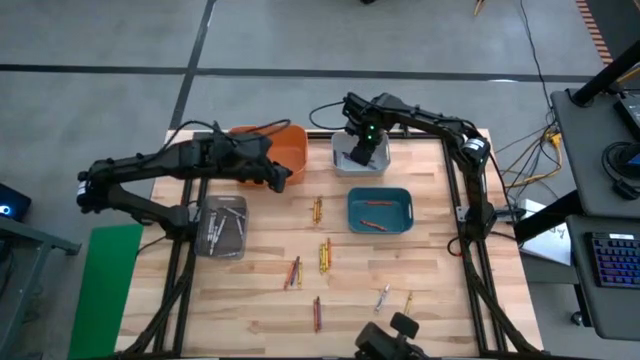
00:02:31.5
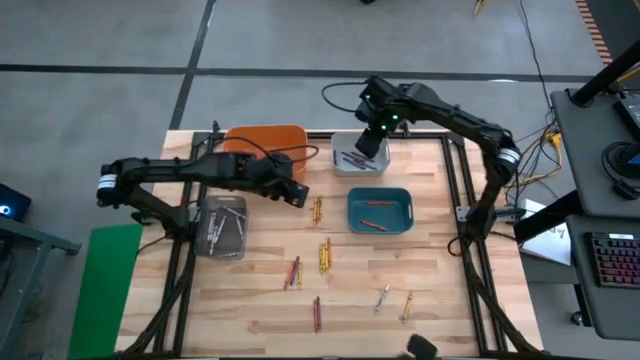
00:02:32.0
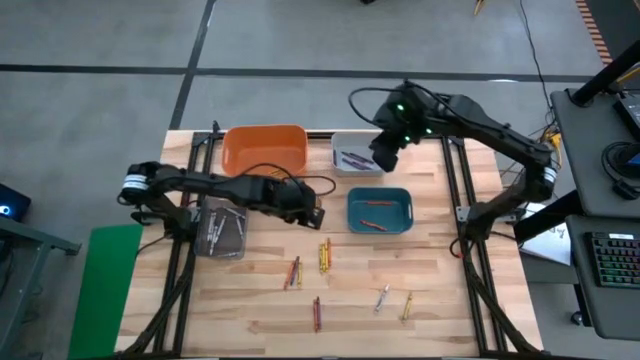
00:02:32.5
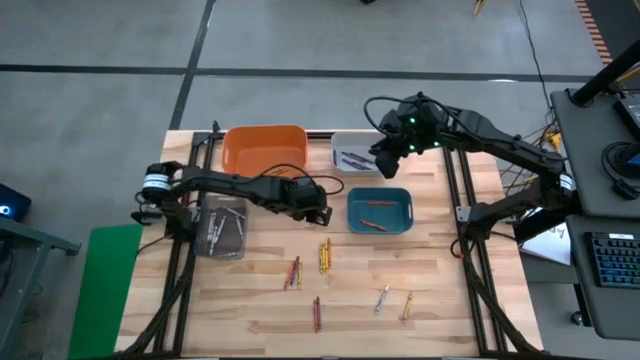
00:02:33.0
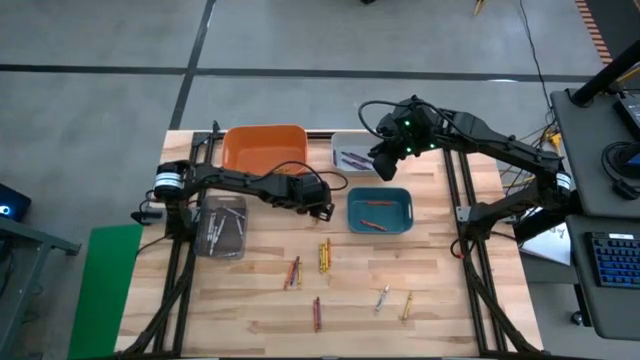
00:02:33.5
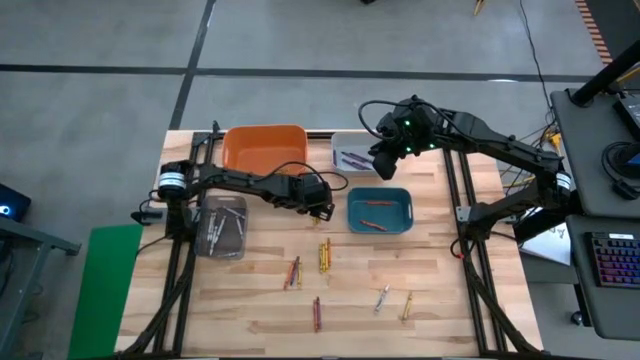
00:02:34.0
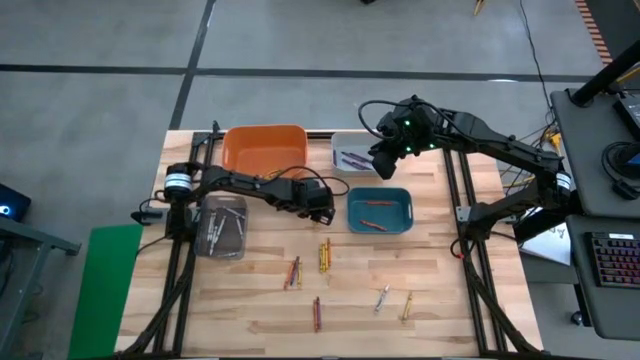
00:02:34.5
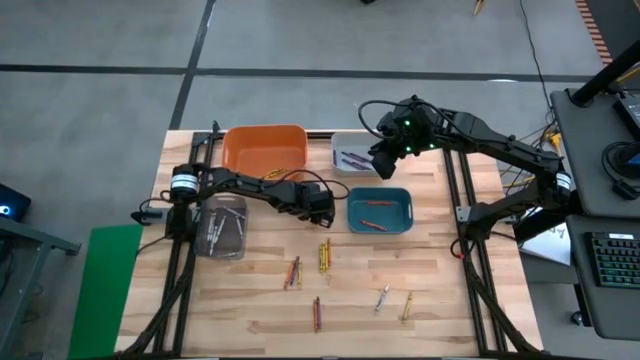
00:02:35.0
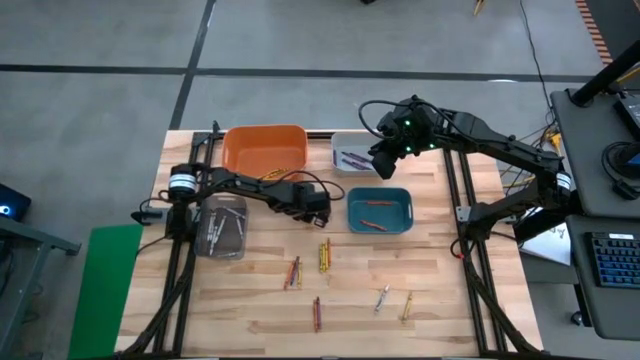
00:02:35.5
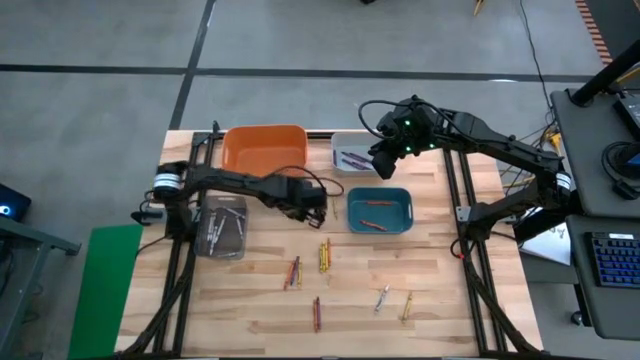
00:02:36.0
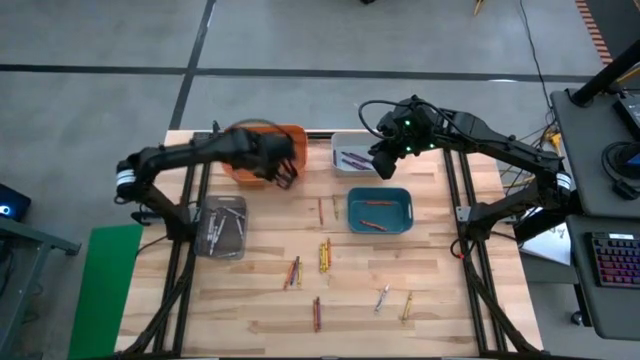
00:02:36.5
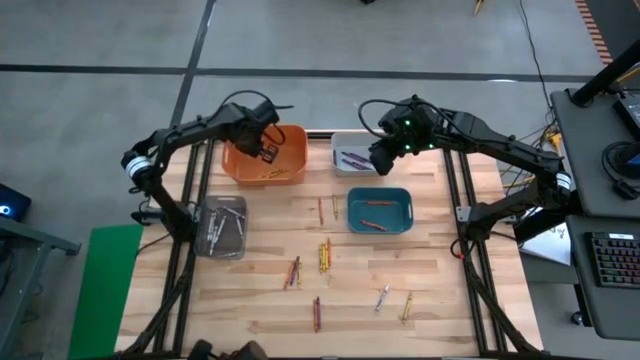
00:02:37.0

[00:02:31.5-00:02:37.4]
Task: Sort crayons
Put the yellow crayon into the orange bin

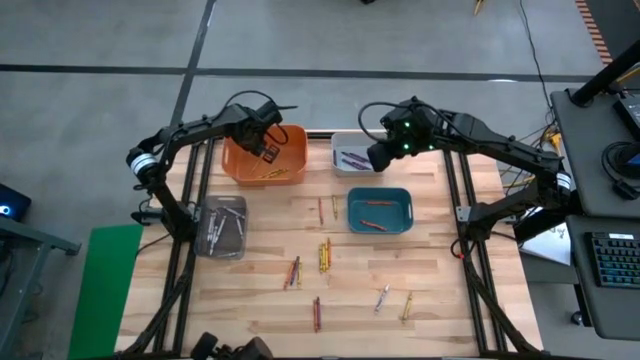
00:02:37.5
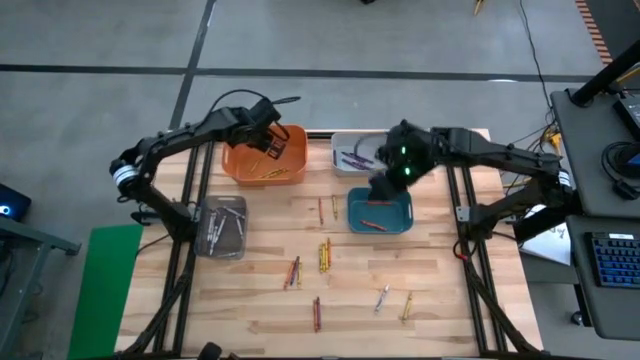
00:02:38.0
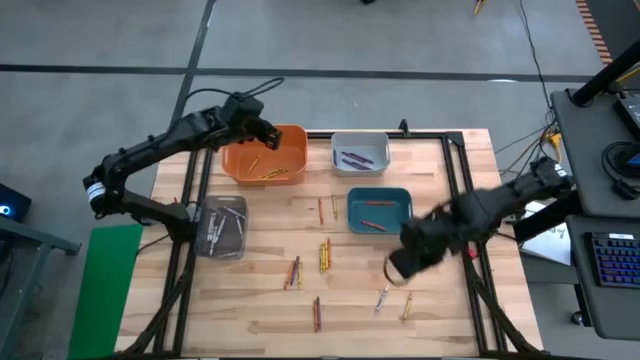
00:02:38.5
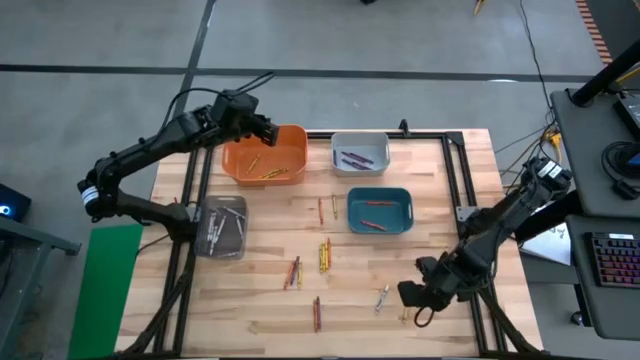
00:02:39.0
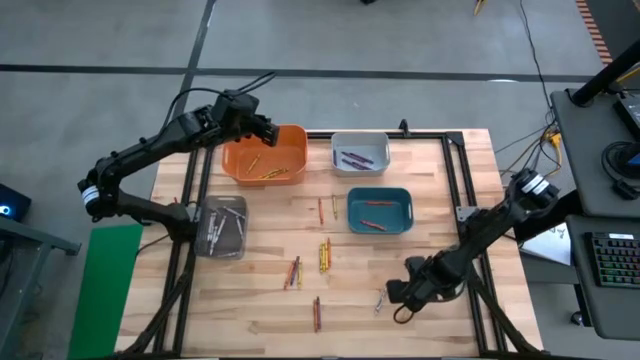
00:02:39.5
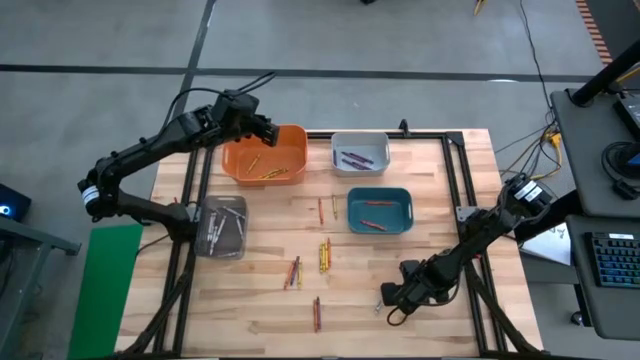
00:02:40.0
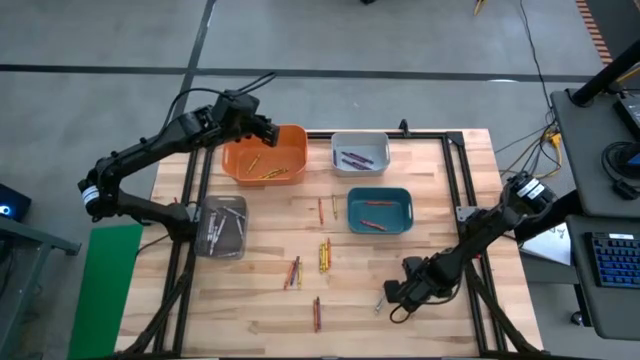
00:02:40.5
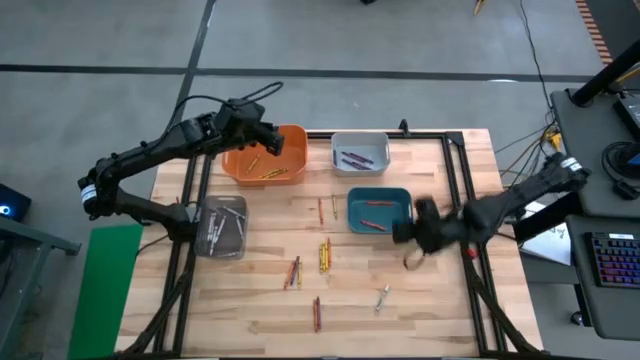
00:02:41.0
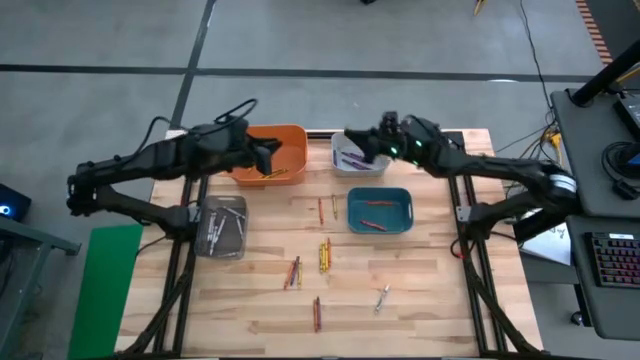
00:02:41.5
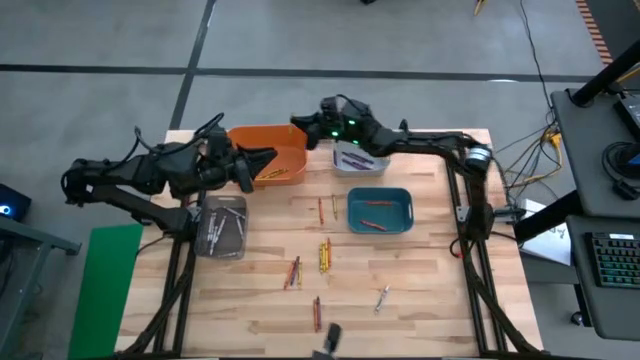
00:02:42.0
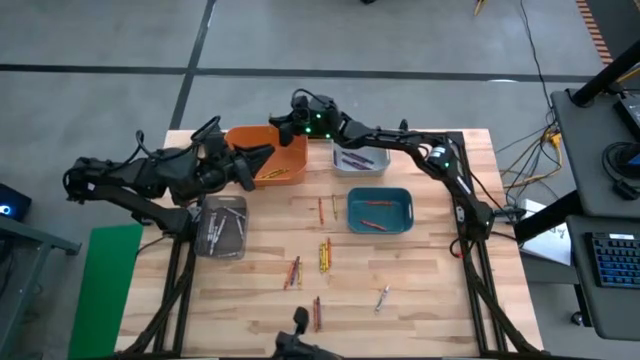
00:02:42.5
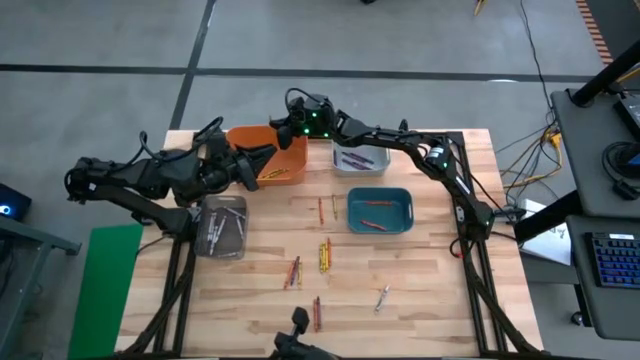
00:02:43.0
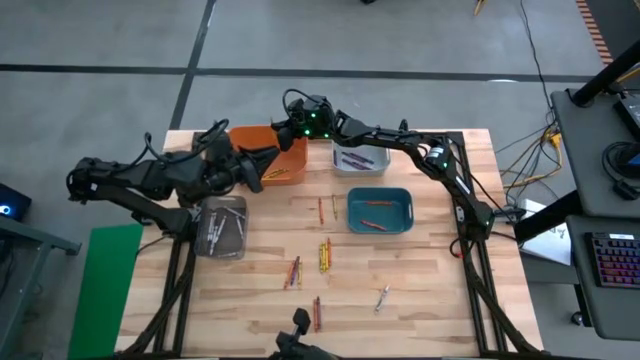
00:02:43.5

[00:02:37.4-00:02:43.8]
Put the yellow crayon into the orange bin

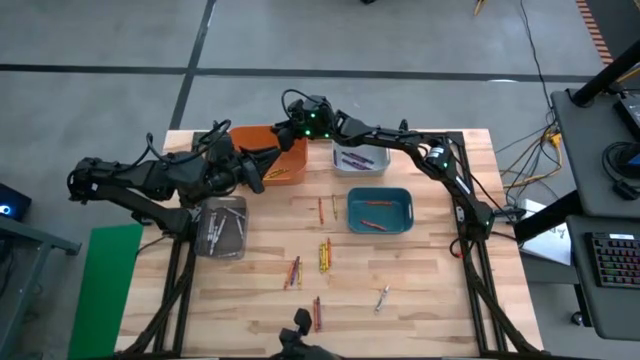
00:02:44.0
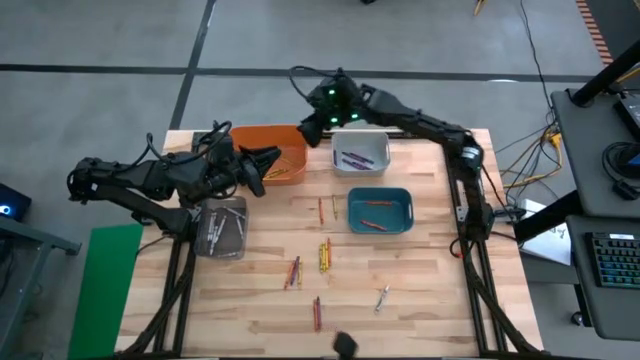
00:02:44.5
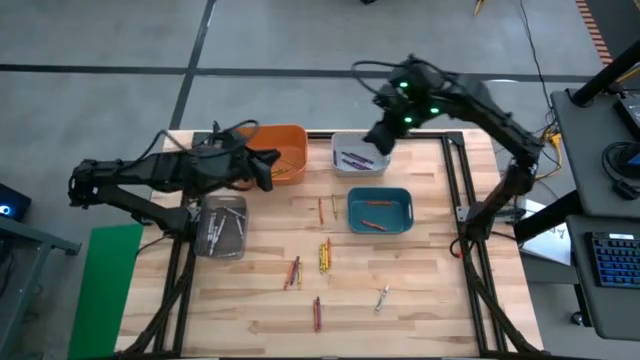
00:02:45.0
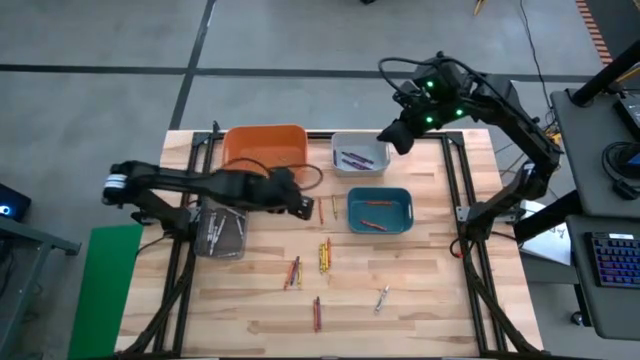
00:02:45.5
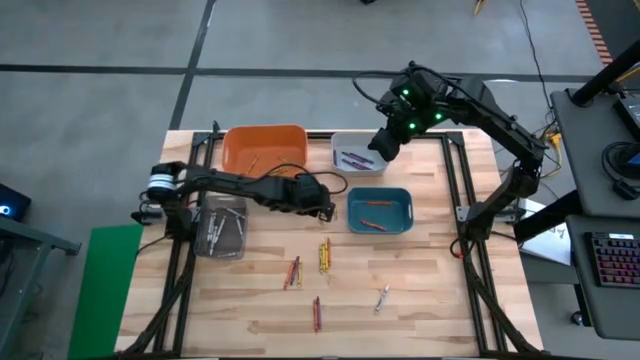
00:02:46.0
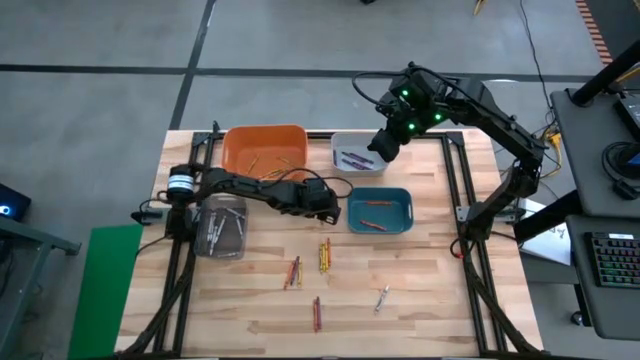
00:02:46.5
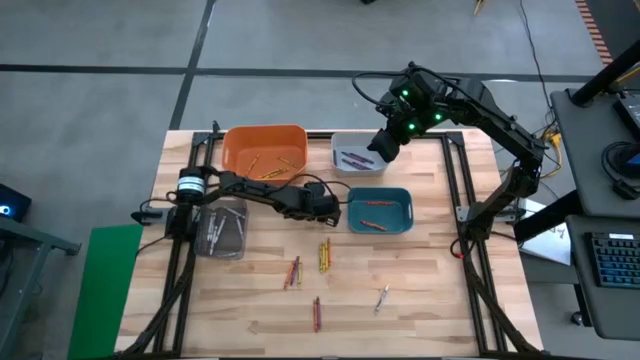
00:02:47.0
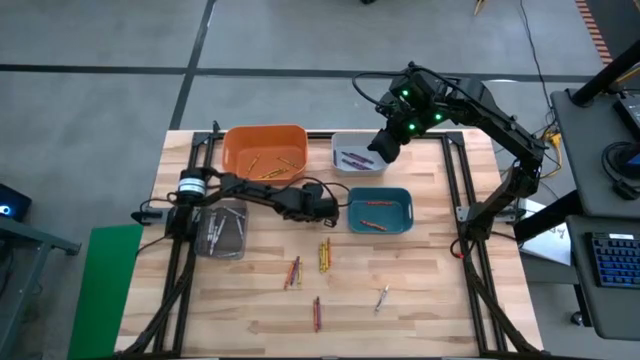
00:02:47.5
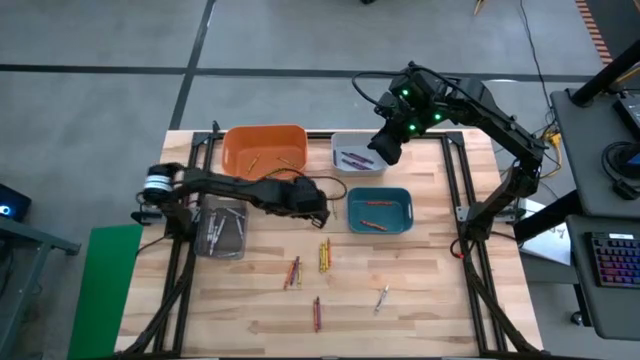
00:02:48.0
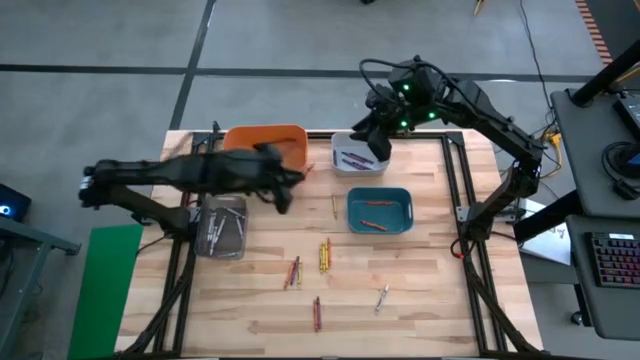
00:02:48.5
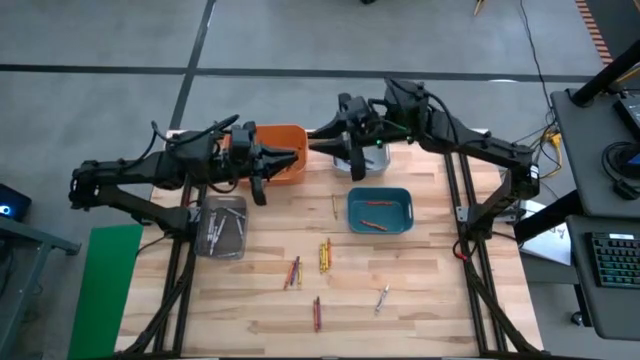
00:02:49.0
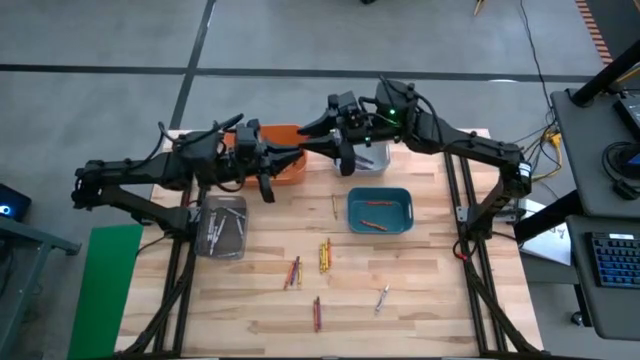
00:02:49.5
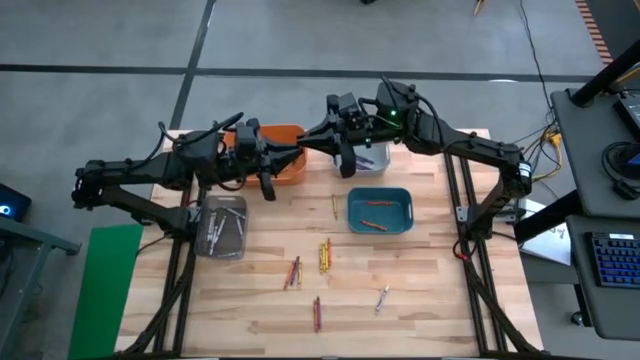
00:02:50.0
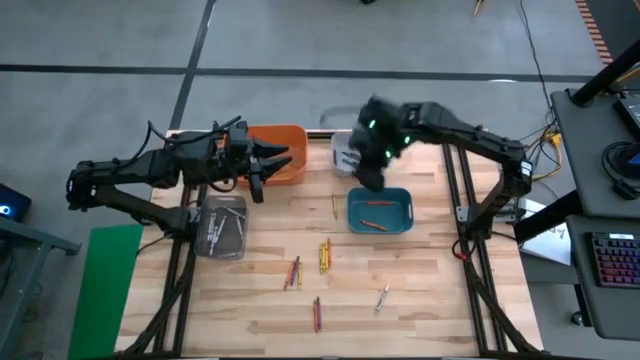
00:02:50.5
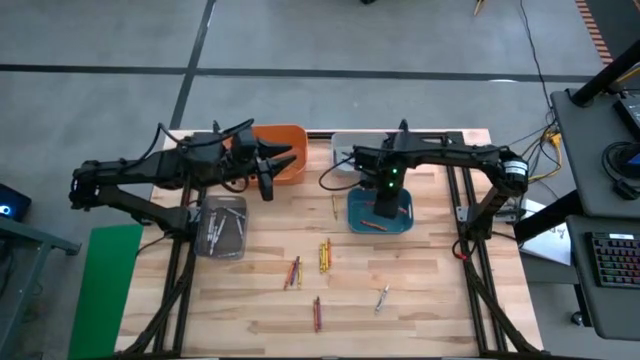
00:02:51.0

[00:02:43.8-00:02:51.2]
Put the orange crayon into the blue bin

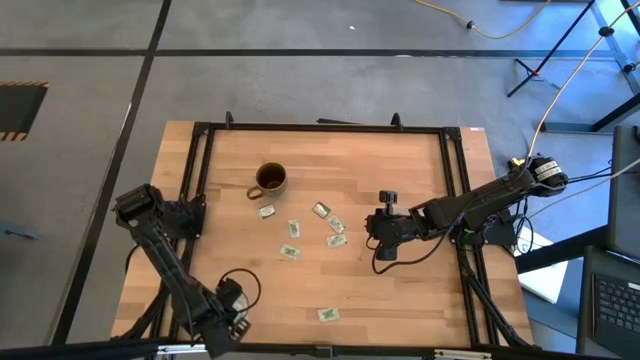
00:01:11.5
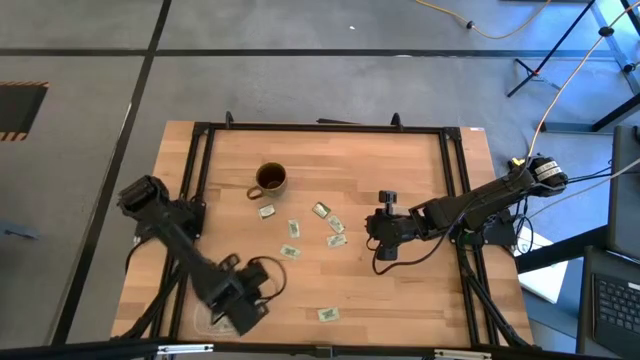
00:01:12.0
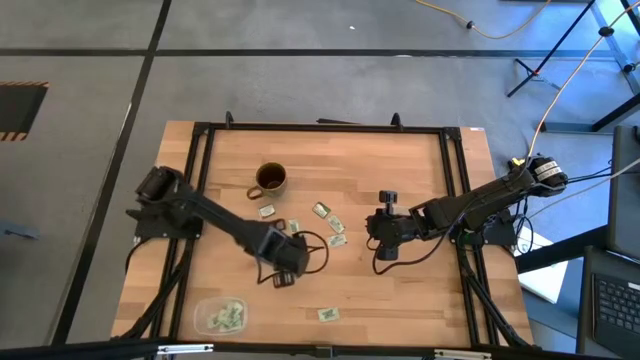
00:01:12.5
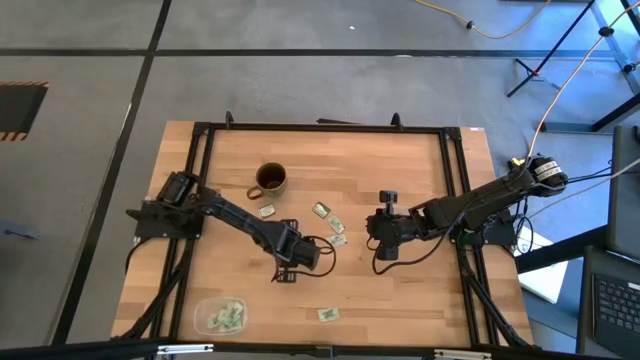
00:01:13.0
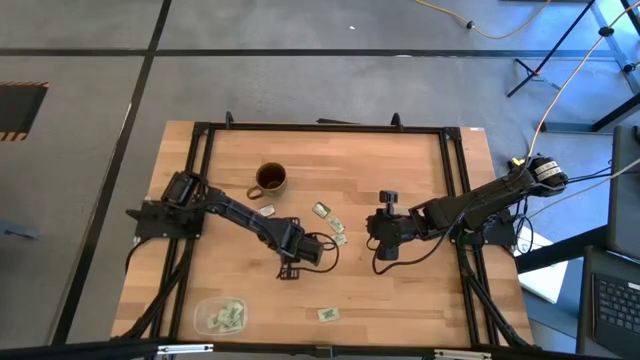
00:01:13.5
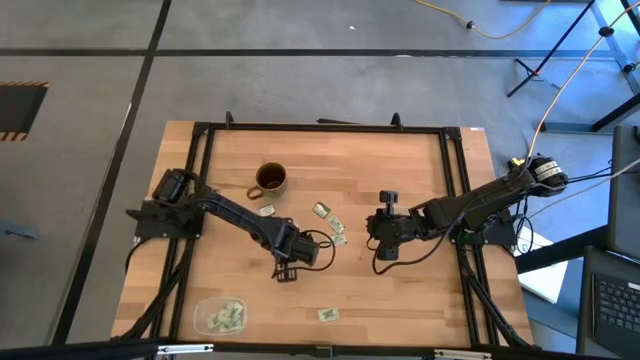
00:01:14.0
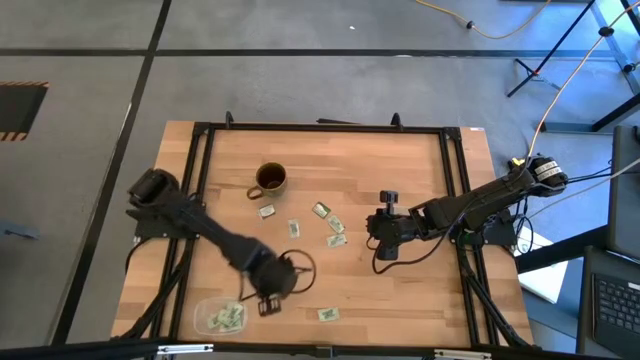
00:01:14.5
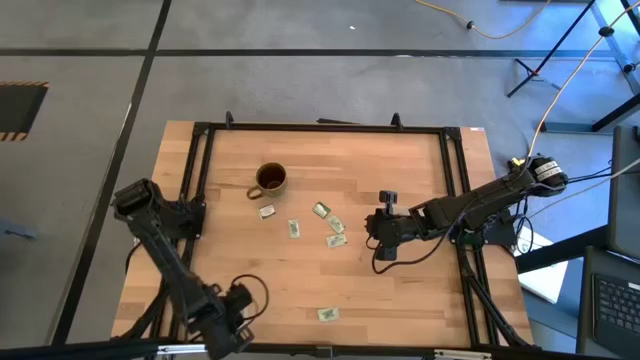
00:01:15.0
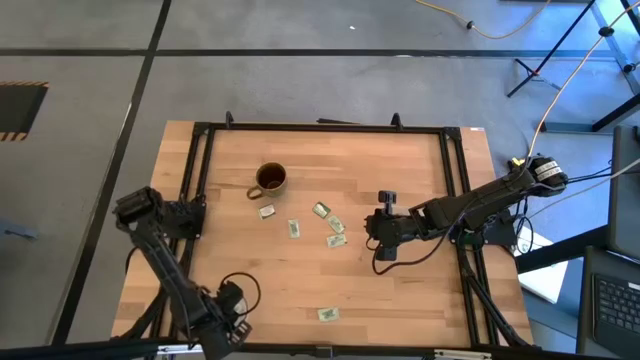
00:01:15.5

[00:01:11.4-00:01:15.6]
Task: Pick and place Stevia / Truvia into bins
Put the stevia packet into the bottom transparent container
